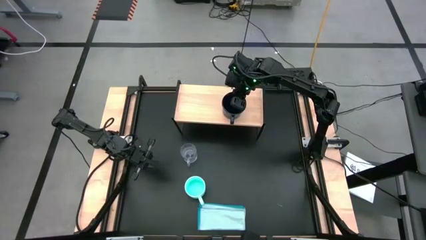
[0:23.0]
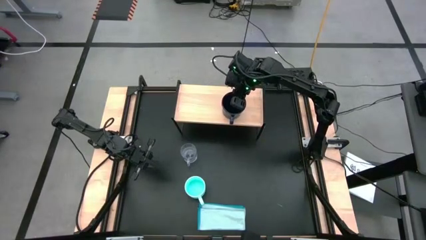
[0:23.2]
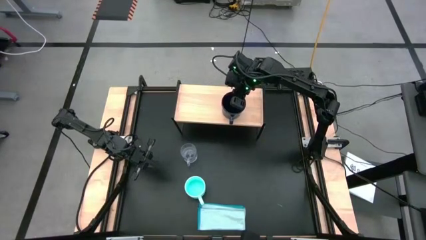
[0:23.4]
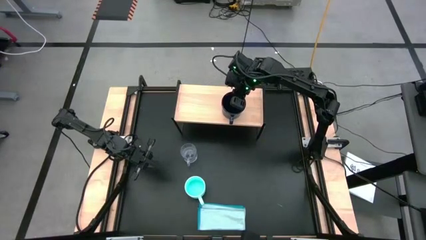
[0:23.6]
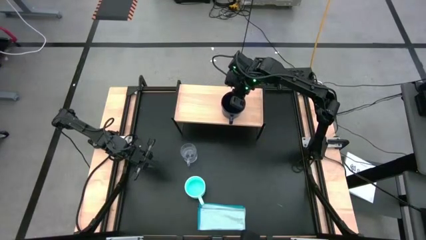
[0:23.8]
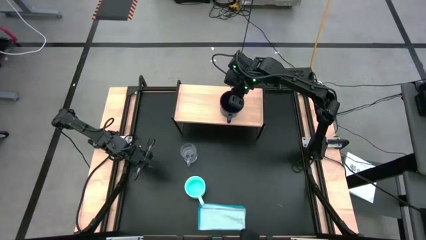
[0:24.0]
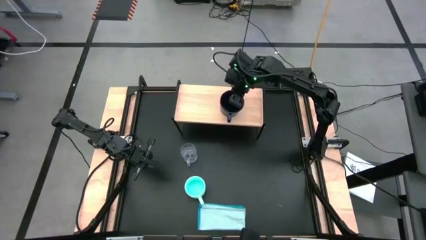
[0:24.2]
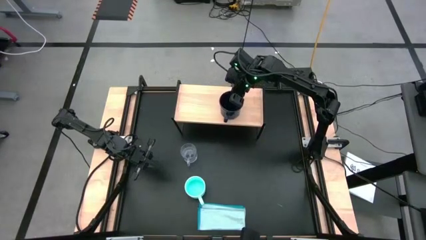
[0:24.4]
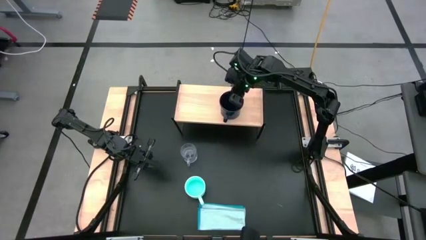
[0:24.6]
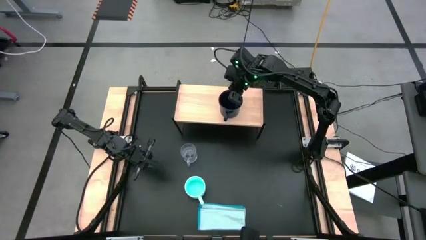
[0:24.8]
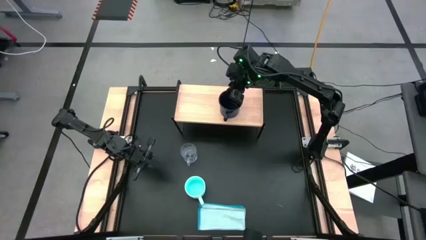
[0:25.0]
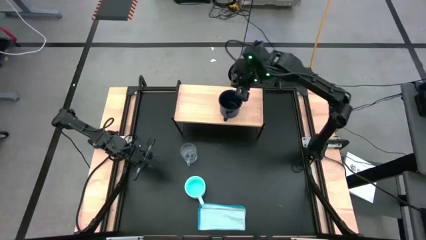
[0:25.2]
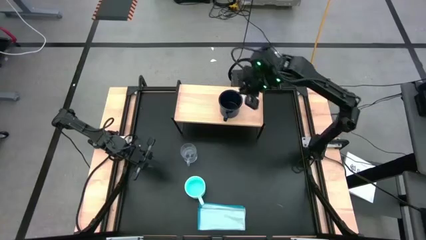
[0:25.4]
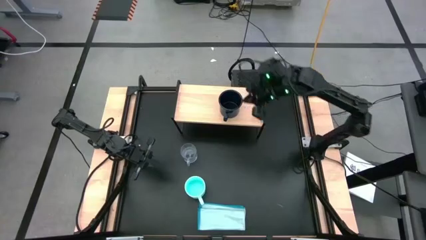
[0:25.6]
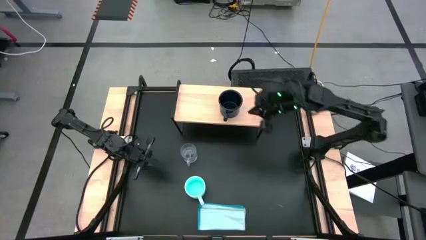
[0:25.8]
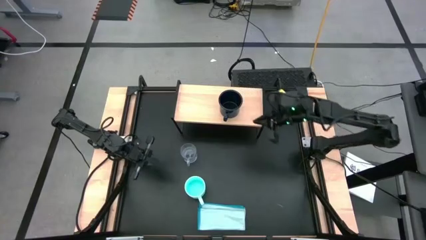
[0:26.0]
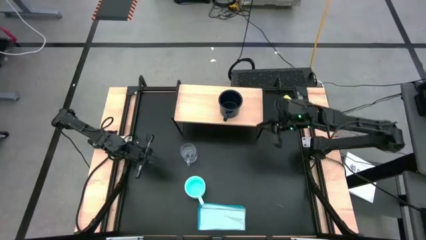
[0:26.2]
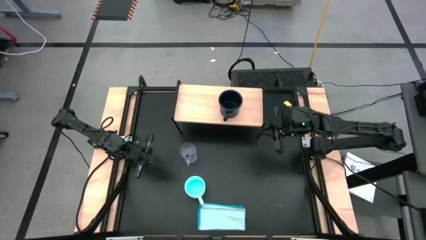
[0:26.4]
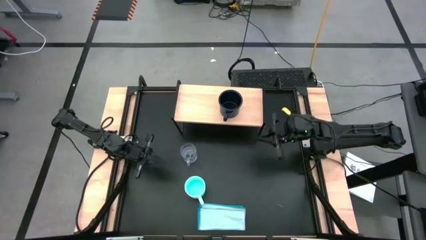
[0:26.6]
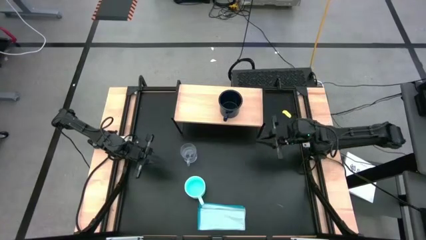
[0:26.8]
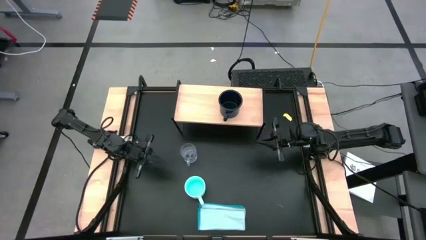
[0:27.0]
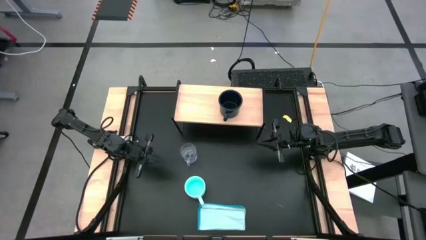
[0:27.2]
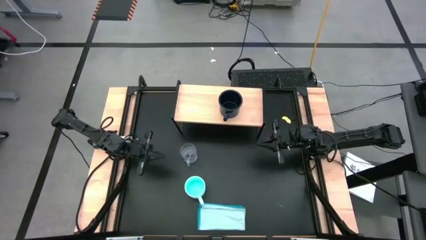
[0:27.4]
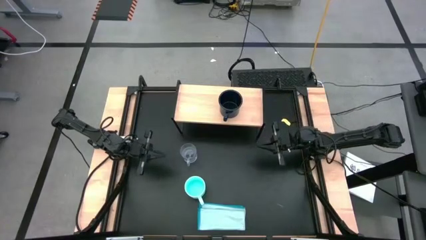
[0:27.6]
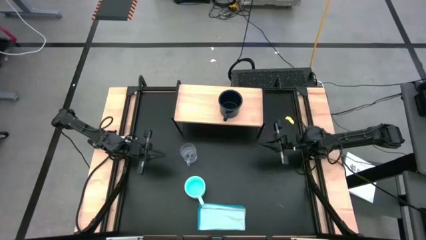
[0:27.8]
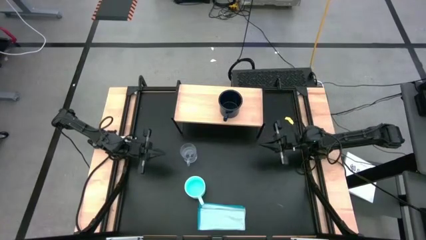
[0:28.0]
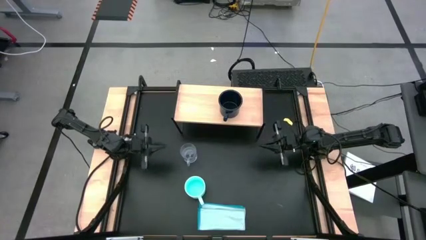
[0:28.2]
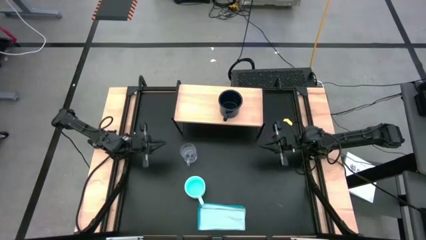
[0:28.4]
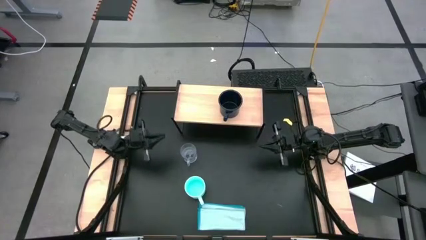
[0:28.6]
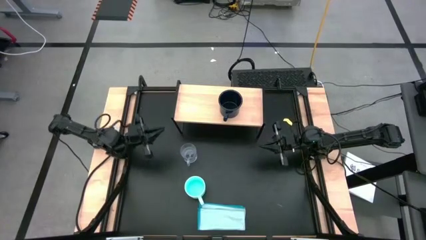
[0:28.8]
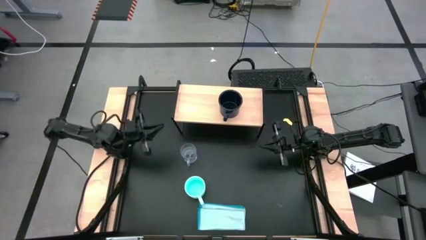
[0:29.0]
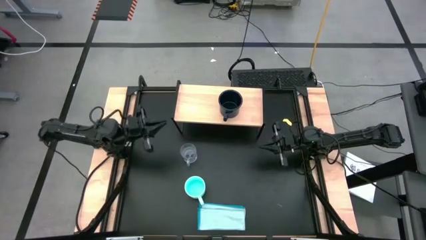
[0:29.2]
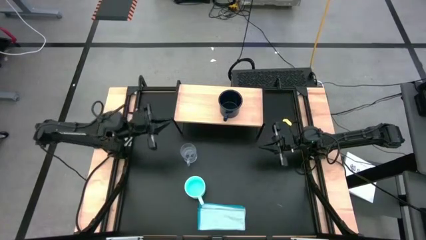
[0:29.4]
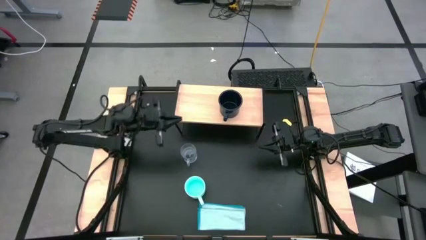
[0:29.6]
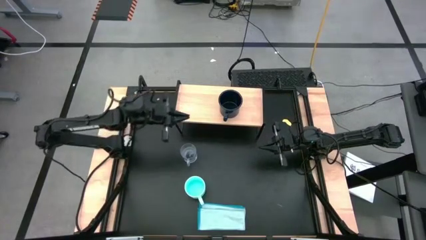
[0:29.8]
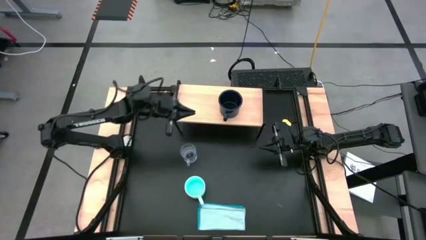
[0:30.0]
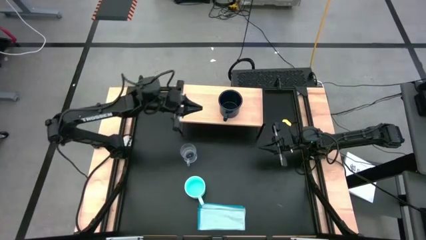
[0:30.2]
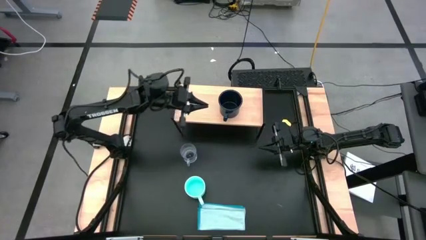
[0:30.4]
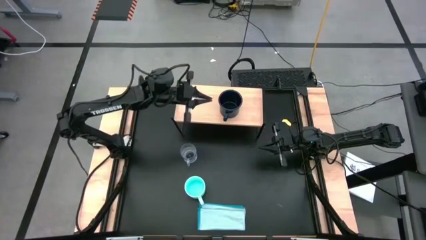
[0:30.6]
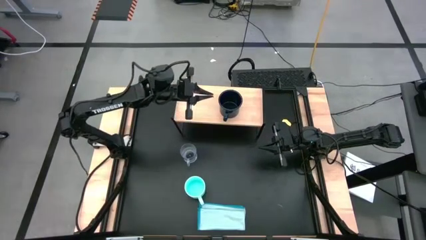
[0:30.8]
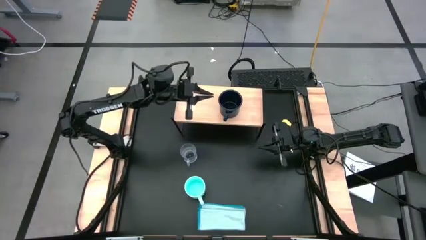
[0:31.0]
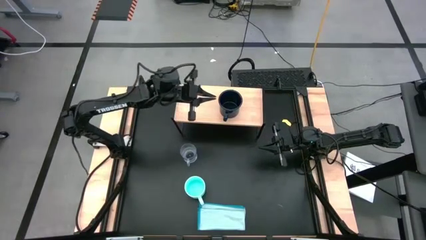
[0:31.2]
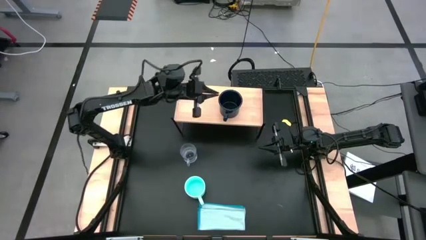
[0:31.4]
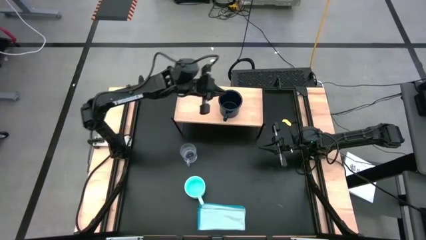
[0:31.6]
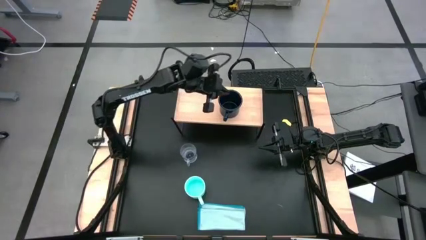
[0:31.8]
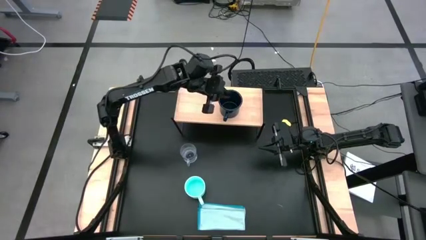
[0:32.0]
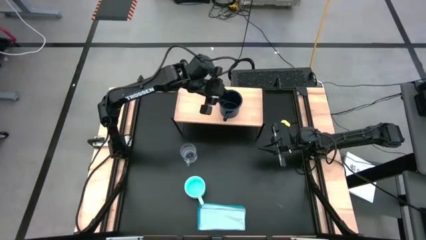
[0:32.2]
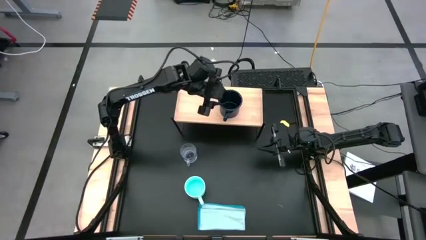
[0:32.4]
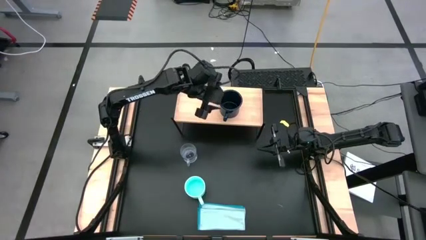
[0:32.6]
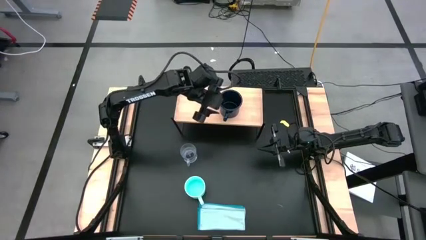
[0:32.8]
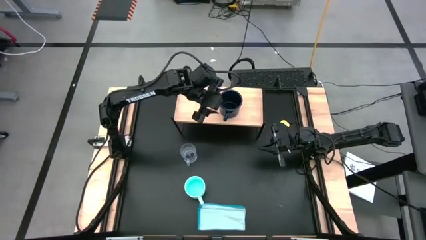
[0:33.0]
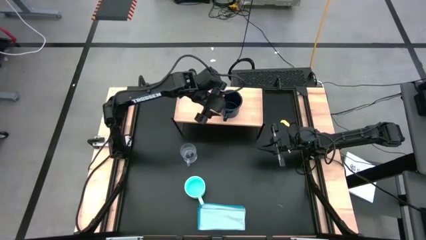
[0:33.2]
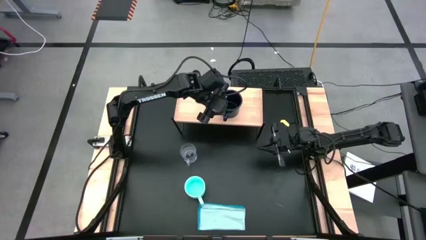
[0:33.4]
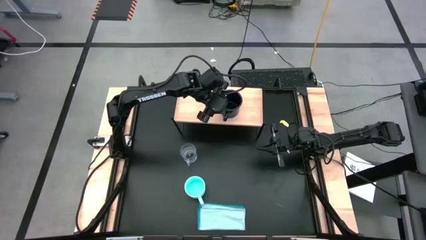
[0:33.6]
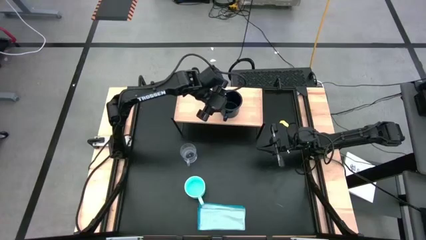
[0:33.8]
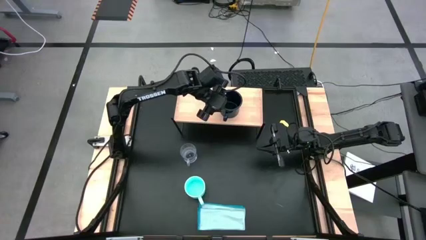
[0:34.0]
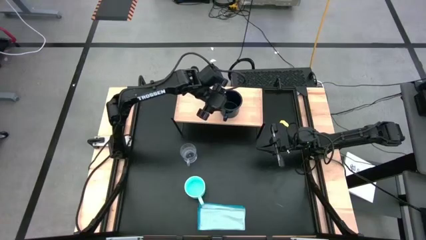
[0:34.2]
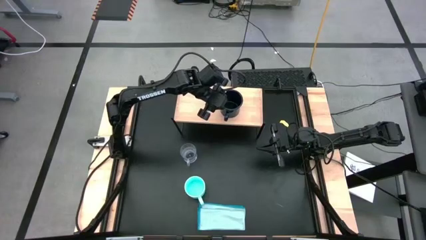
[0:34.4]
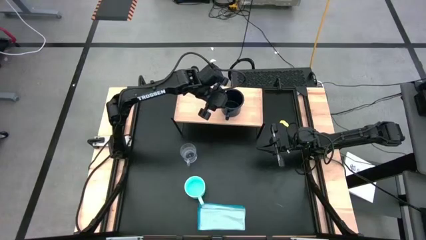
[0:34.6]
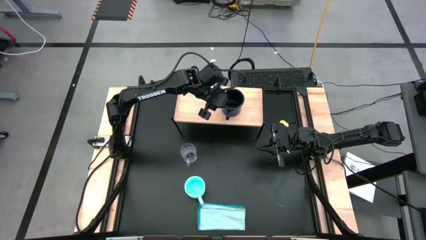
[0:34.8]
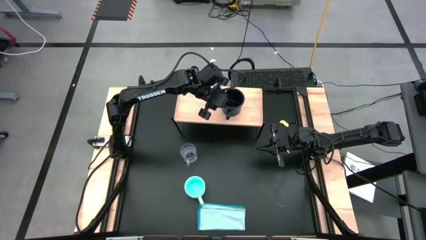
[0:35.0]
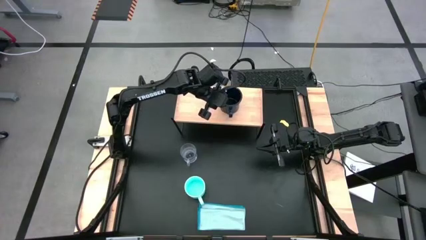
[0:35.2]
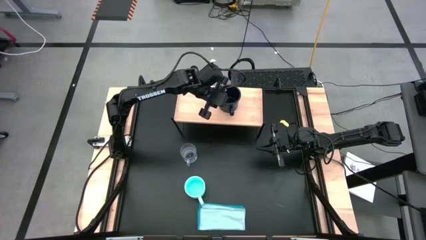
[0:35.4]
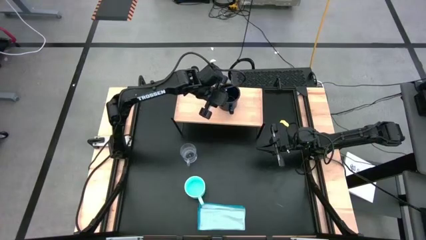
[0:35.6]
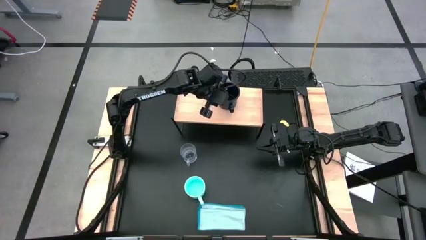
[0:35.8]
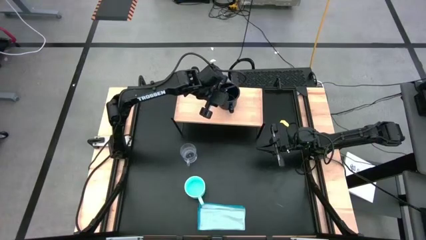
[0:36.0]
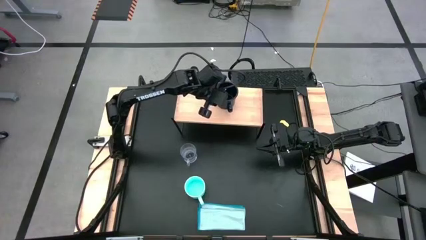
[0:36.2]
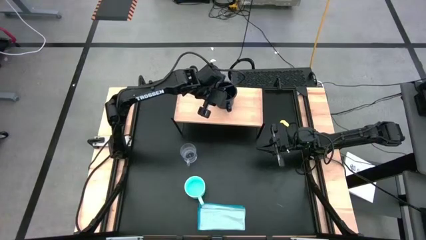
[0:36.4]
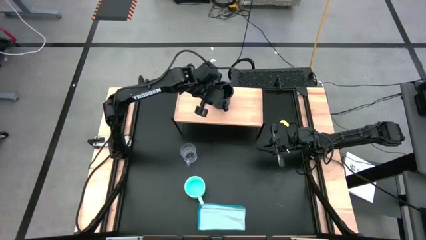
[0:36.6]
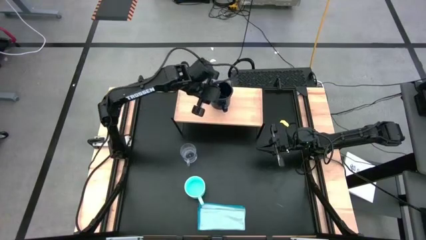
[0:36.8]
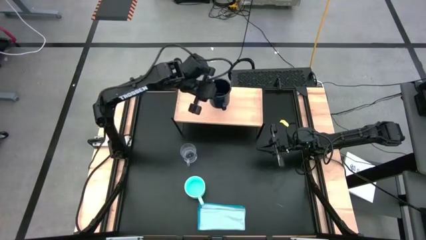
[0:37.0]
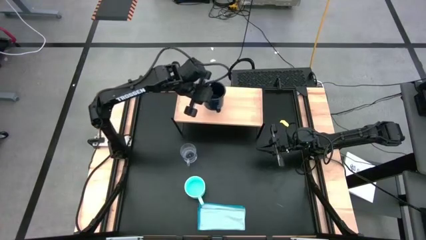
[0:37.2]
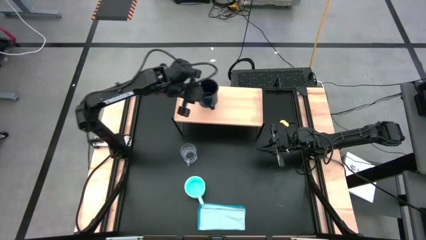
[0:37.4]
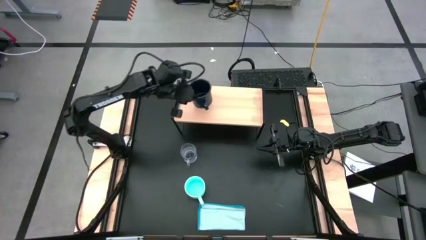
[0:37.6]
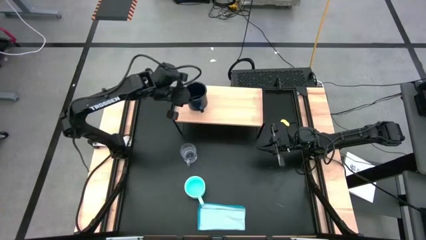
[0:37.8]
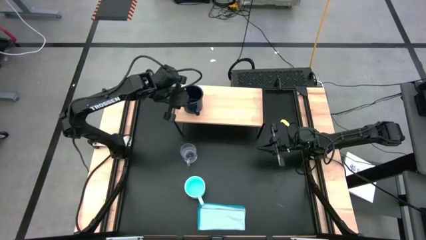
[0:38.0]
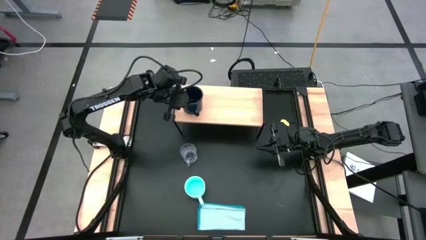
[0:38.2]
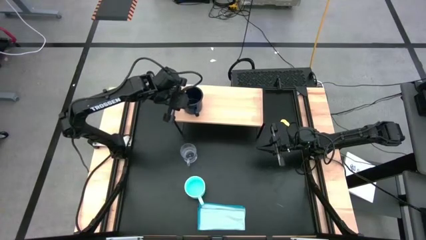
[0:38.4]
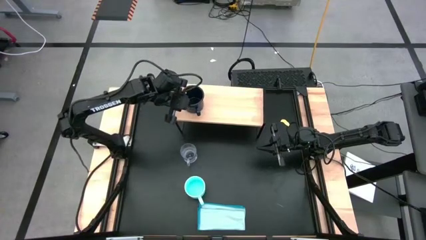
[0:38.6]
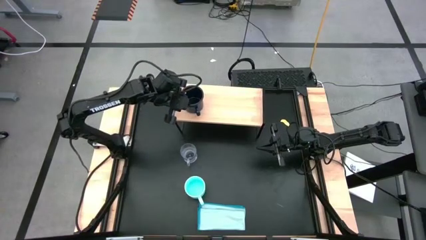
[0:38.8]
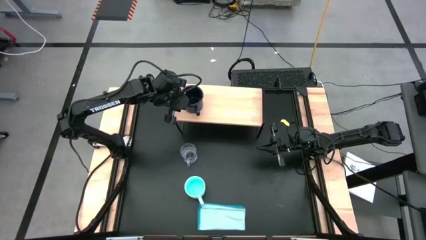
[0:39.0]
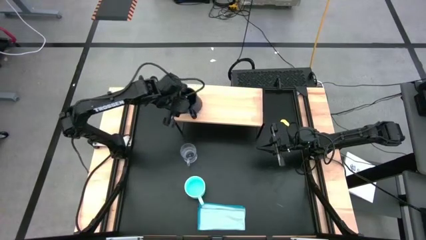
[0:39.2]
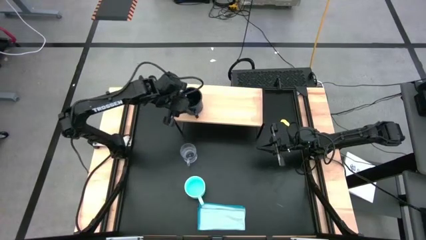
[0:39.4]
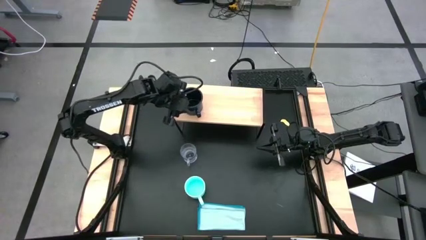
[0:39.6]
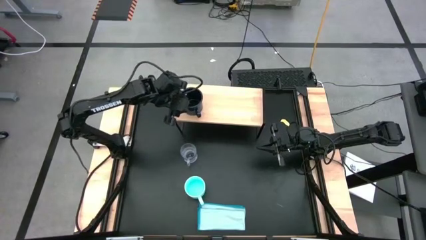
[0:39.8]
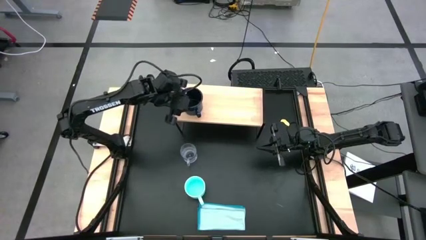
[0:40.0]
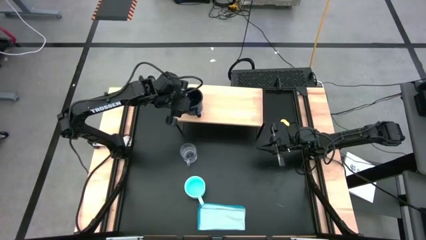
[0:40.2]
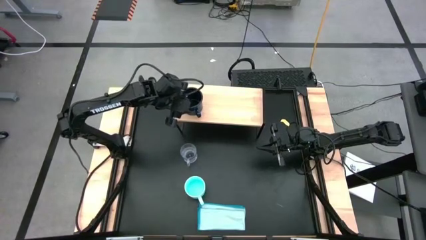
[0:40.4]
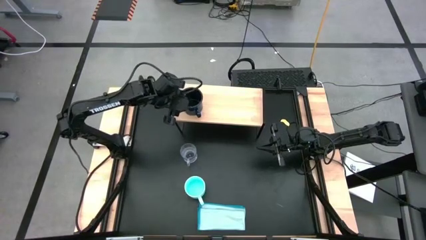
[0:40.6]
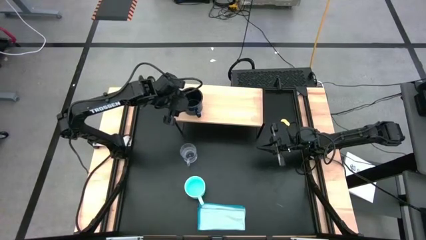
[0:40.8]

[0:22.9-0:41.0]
Task: Stack small to large cups/mugs on shelf
Put the dark blue mug on the shelf
